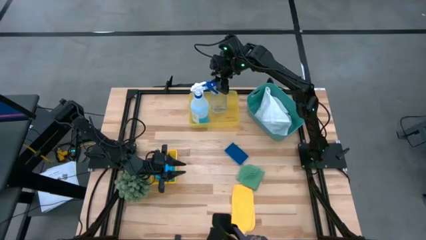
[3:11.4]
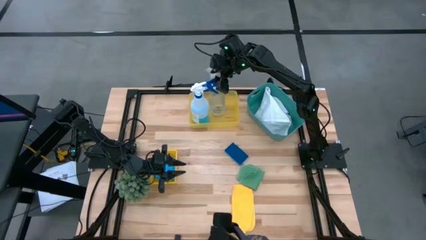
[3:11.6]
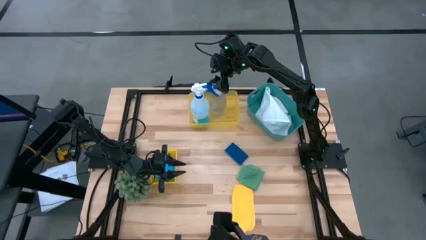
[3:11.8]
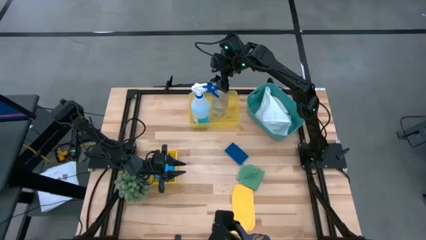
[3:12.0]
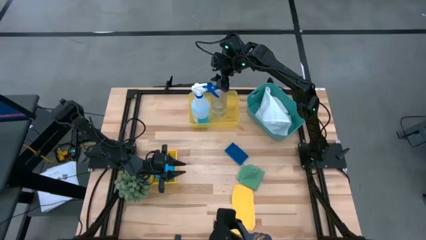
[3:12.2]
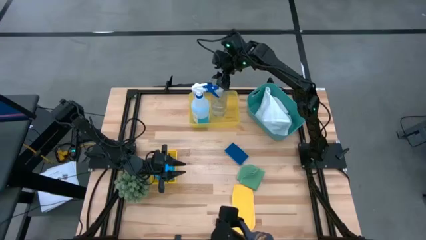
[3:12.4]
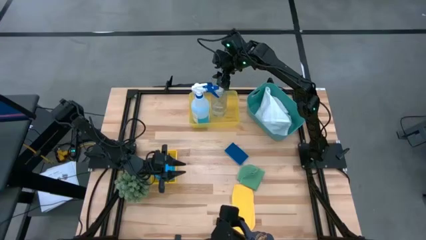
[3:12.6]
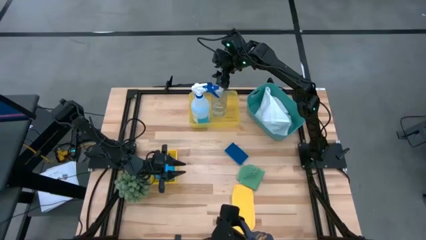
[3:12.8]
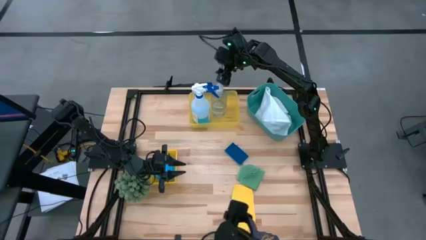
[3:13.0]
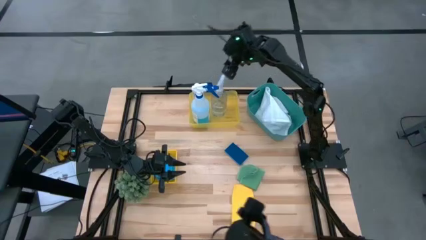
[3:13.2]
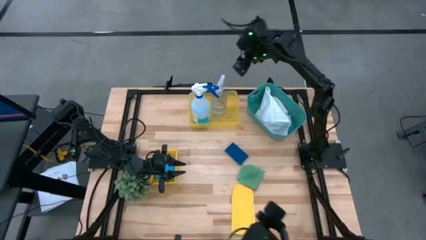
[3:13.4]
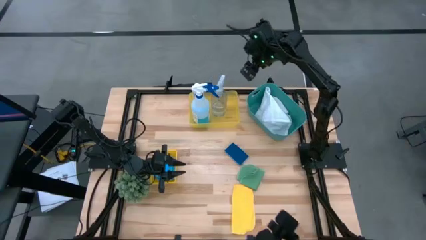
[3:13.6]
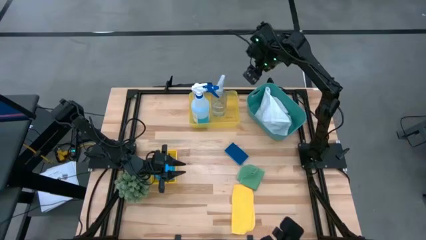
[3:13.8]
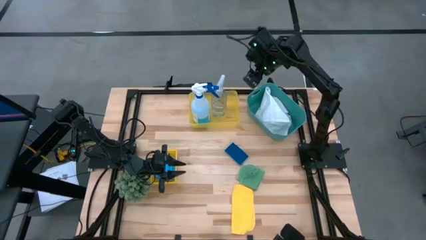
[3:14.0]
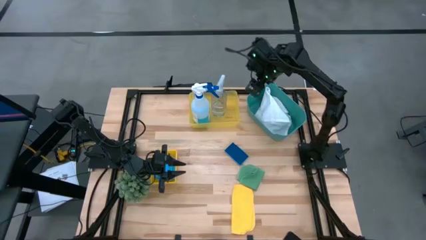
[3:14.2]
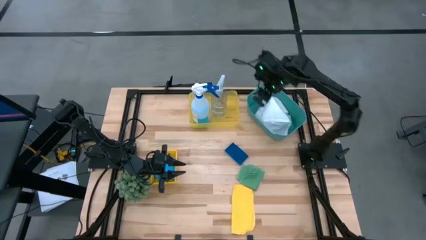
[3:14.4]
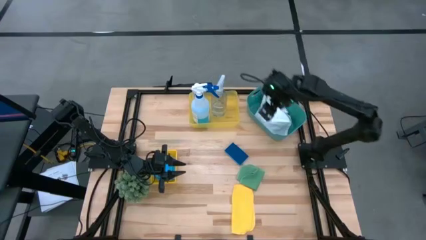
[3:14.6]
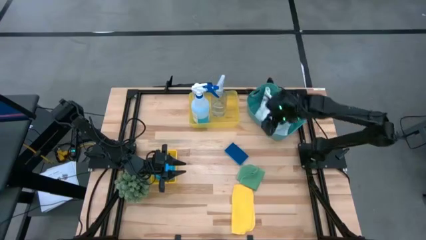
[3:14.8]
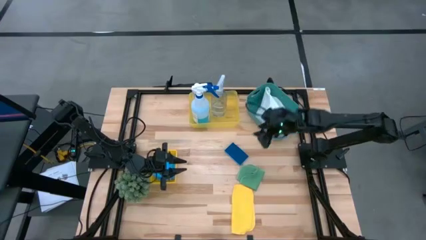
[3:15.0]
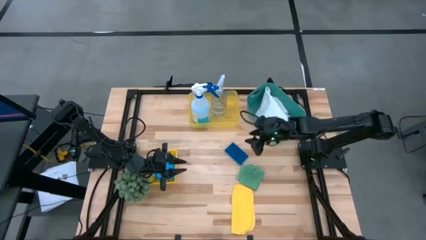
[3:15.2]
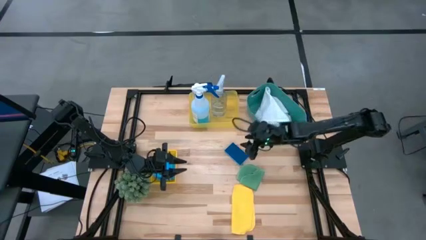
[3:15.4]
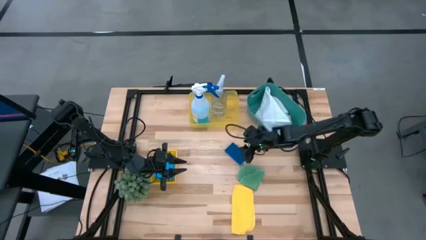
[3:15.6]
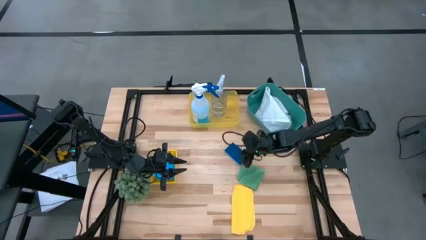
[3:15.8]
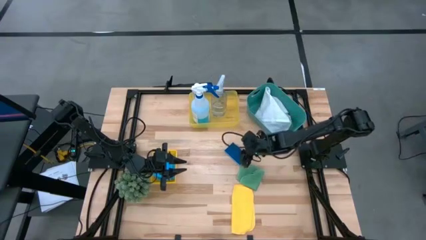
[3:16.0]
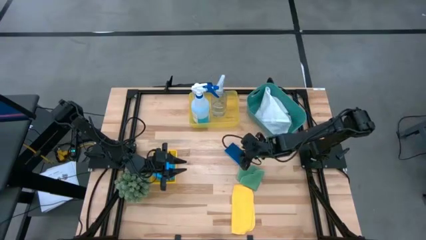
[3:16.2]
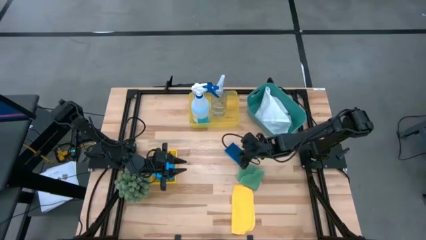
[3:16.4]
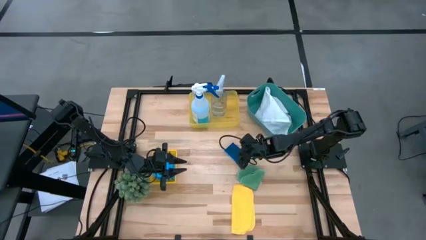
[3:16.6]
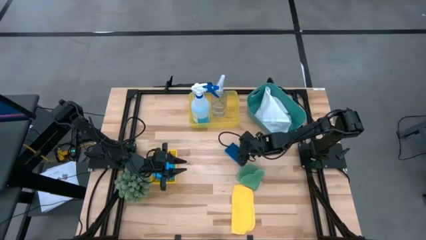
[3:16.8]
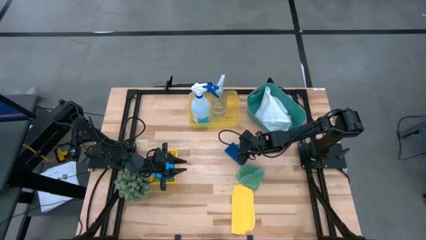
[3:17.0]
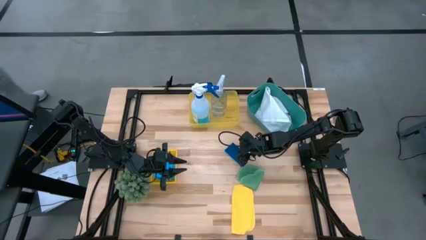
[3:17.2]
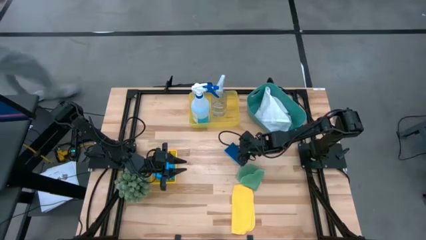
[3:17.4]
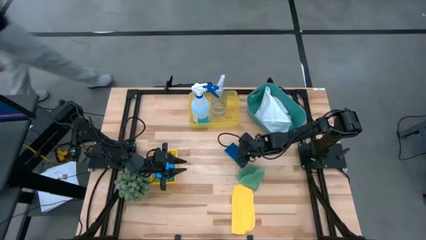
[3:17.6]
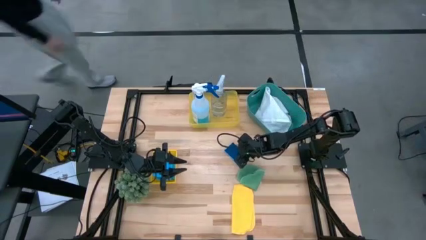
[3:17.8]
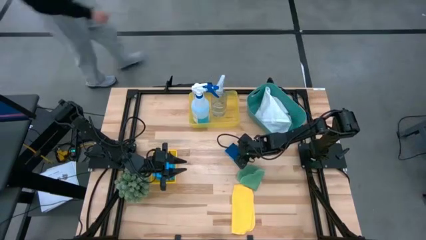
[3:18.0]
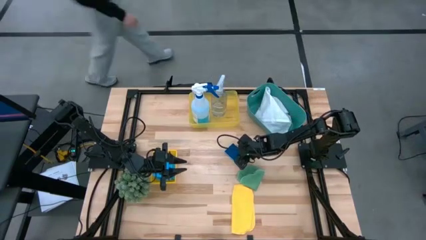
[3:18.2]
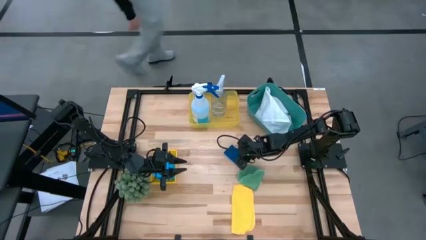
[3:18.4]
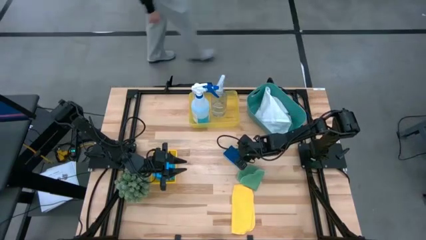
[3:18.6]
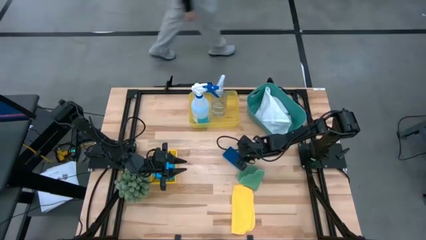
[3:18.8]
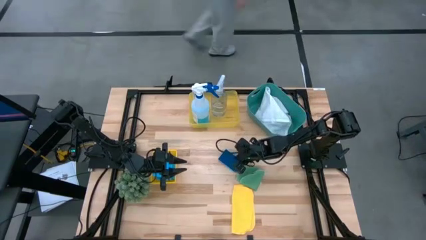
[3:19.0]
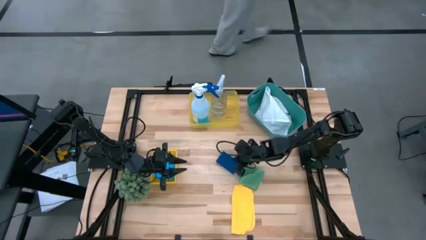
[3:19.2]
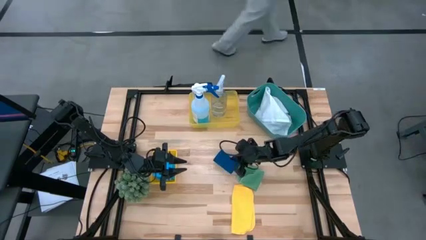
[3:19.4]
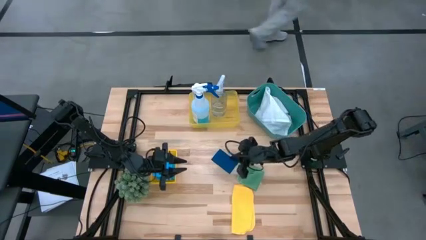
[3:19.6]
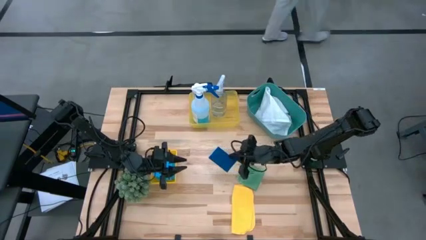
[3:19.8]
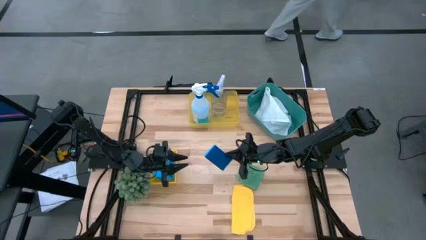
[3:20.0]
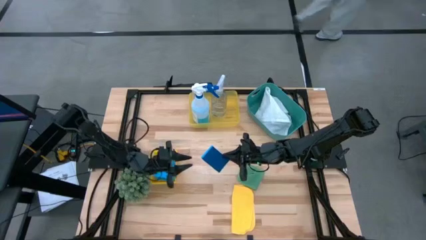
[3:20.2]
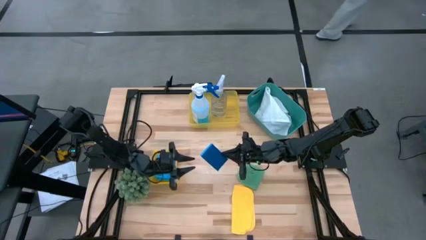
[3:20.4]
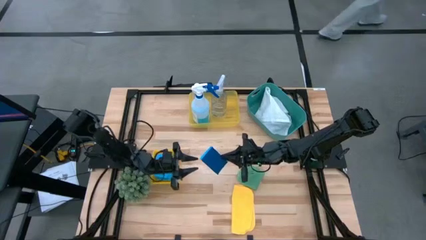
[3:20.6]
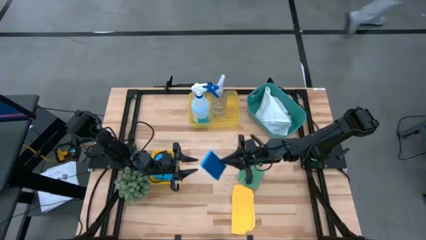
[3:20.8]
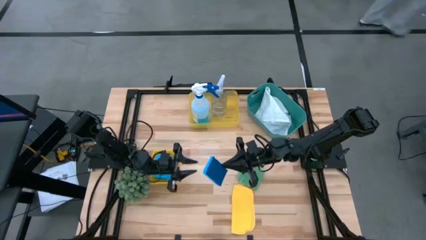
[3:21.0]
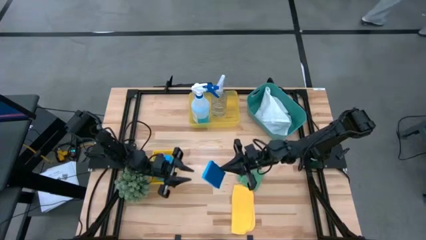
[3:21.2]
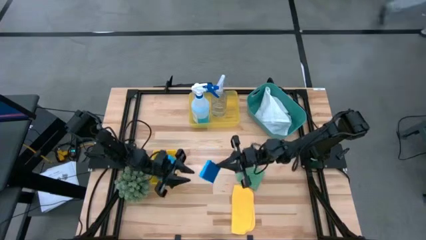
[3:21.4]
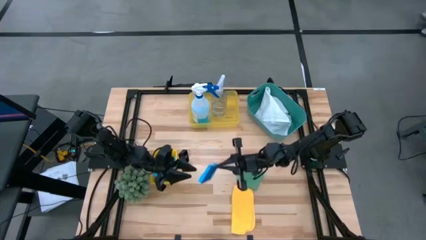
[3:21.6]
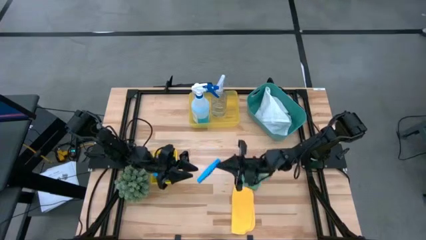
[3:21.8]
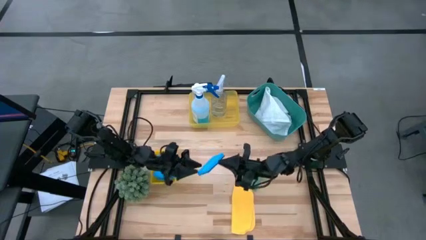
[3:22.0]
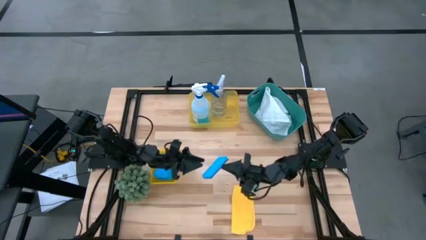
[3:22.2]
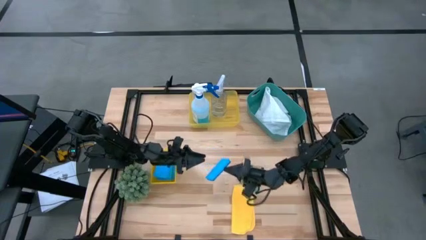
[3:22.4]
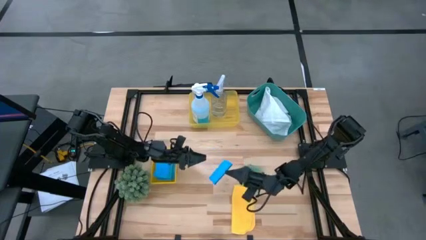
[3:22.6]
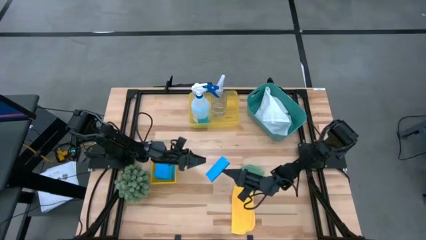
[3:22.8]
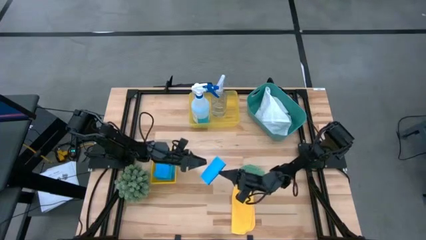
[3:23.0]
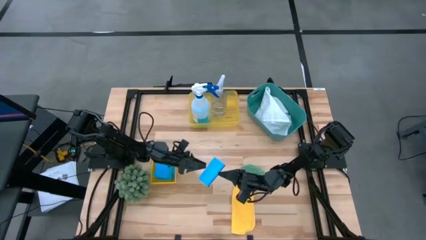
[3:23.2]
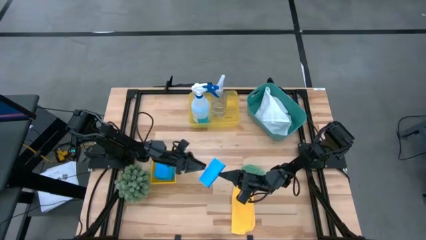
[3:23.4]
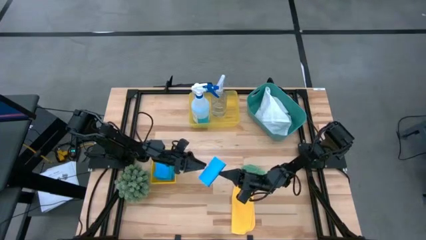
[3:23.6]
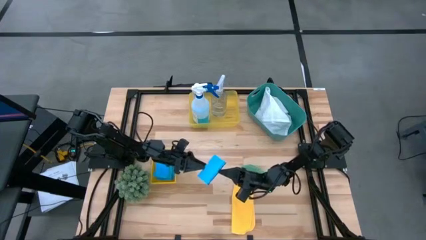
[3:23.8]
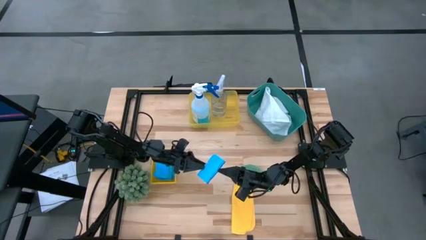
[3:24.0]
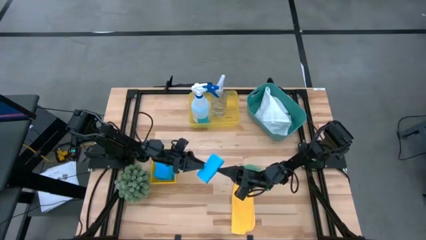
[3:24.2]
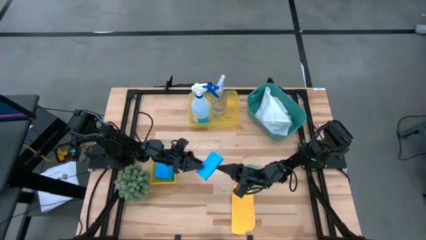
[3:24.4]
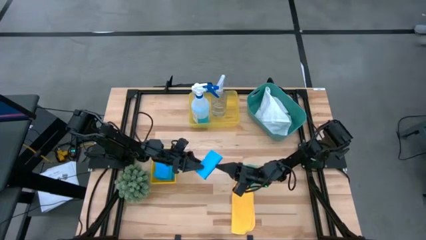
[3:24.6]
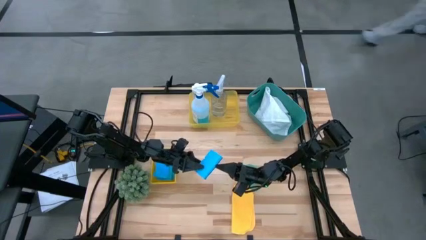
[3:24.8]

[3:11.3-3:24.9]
Task: Pick & Place Kitchen Items
Put the blue sponge into the bottom yellow bin

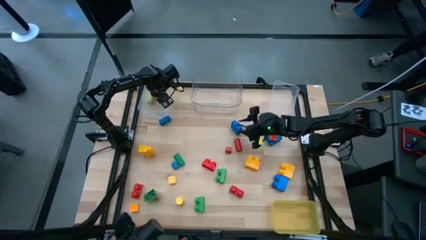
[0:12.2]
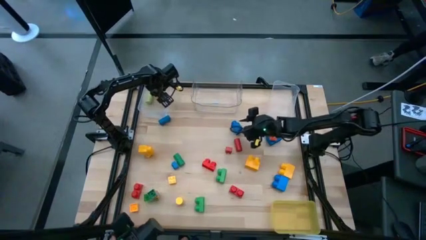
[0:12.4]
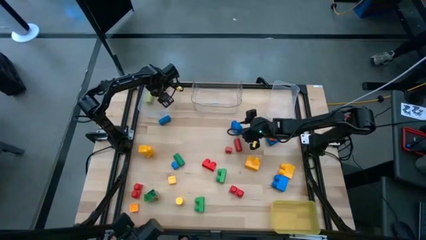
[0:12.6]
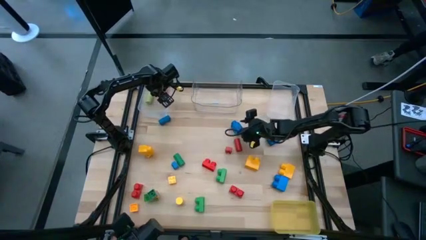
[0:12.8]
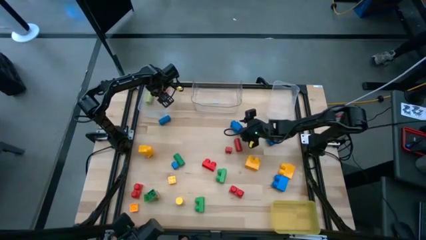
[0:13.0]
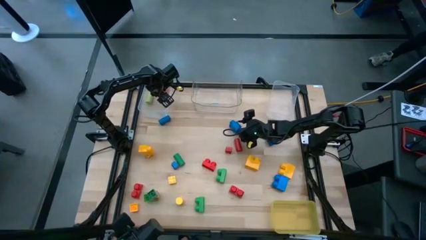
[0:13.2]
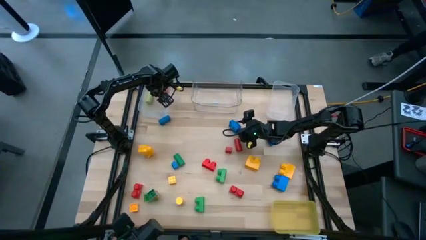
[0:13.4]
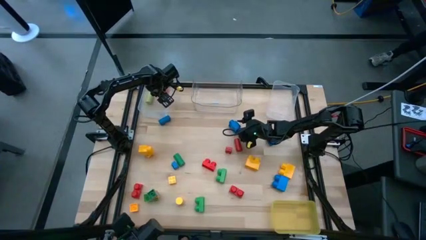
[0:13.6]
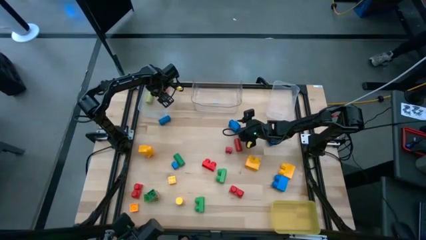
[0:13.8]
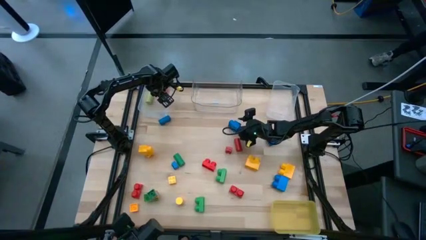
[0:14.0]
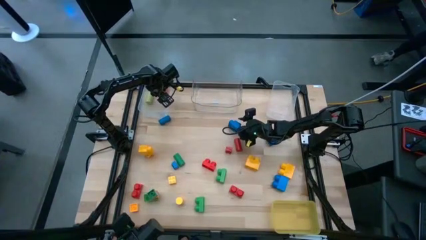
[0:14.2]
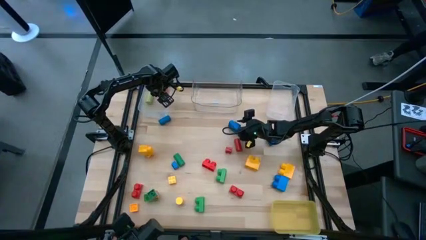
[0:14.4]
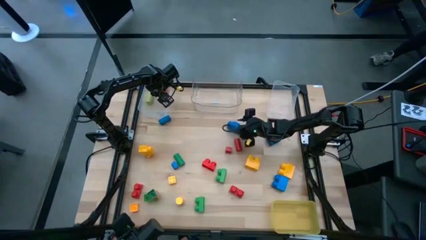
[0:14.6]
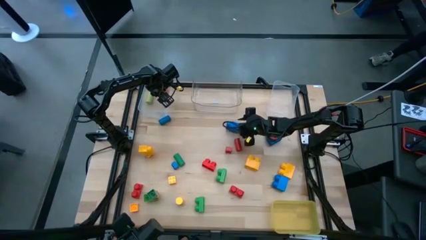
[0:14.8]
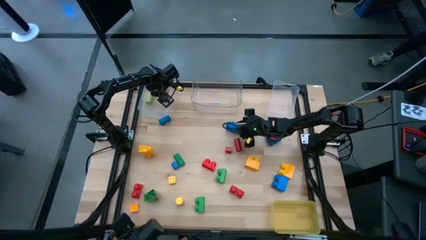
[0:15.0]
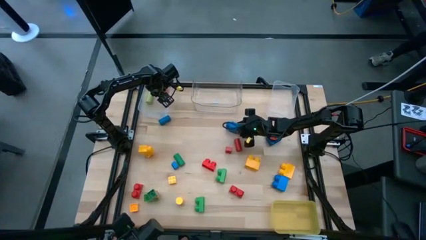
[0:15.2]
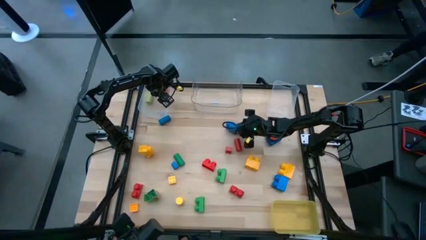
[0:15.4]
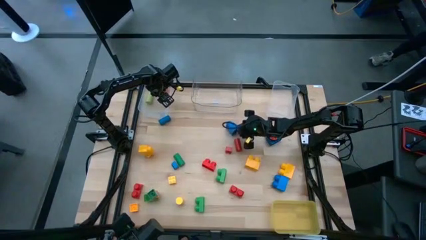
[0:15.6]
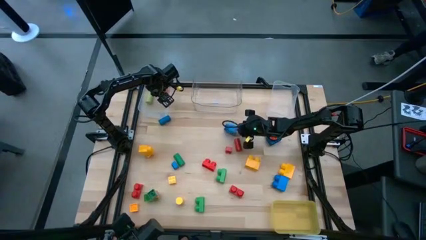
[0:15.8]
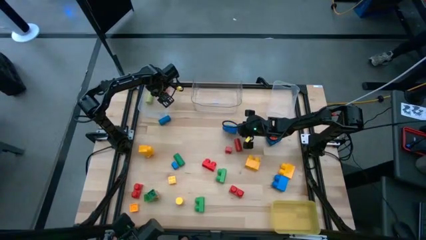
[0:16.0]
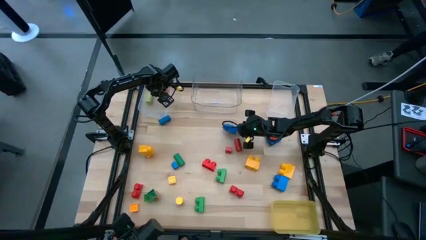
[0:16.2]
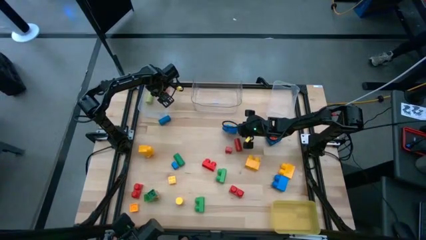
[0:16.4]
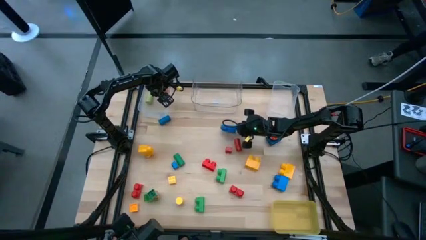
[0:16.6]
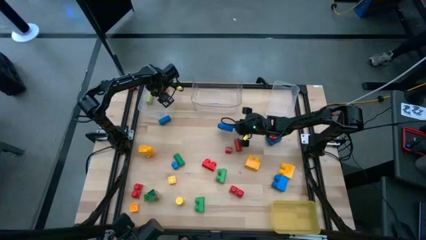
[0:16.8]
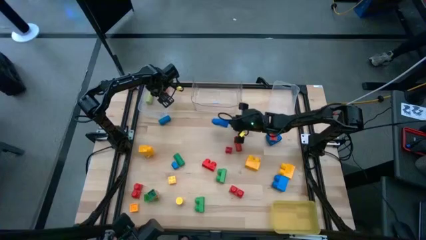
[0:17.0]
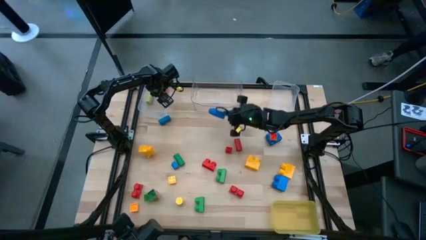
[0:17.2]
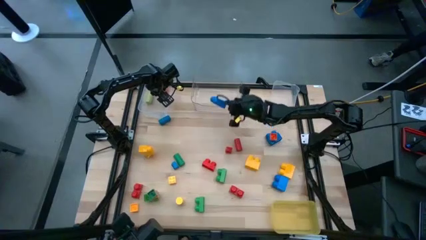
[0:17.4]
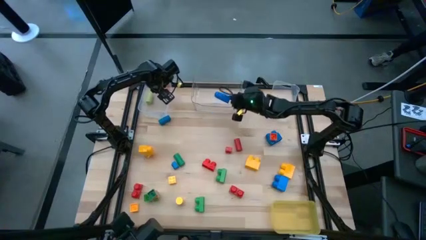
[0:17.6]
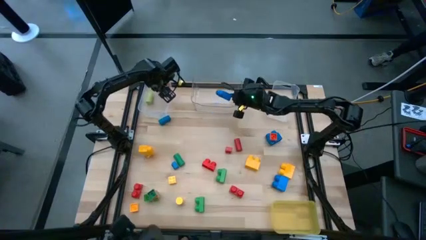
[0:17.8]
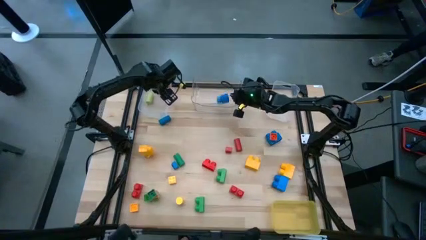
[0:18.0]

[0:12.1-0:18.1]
Task: Sort blocks by size
Put the large blue game piece in the middle transparent bin
